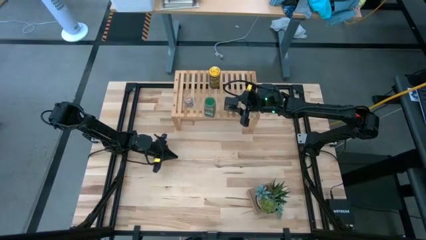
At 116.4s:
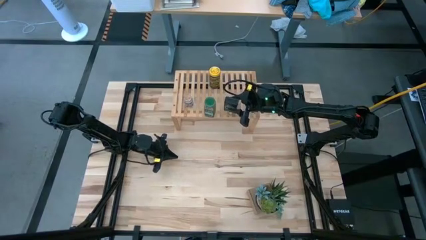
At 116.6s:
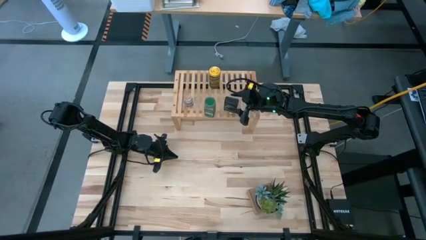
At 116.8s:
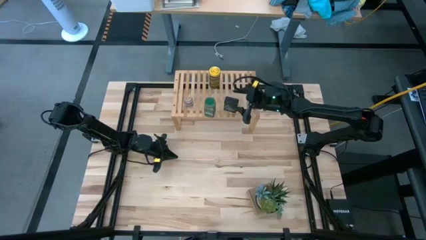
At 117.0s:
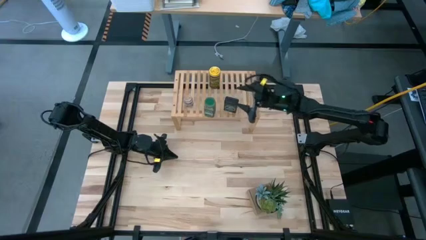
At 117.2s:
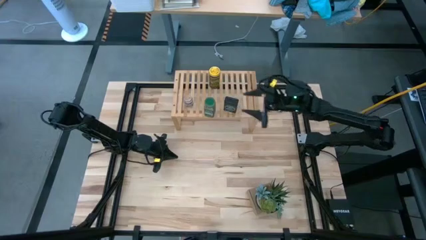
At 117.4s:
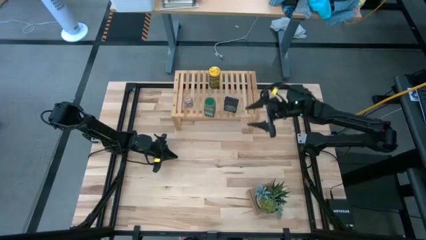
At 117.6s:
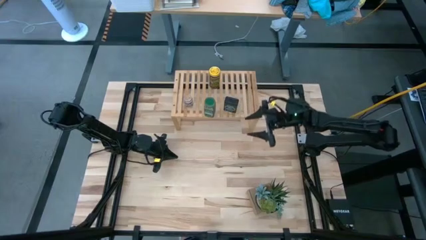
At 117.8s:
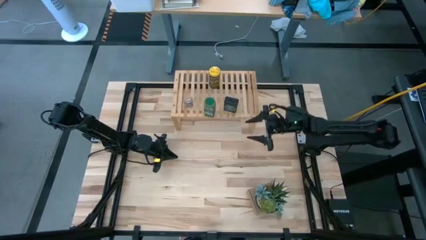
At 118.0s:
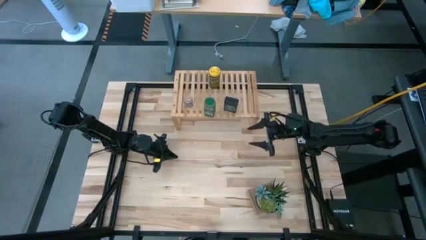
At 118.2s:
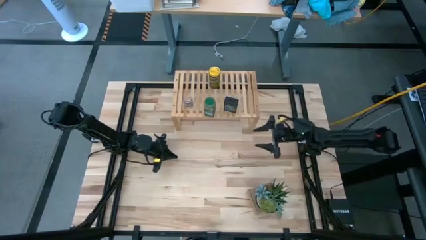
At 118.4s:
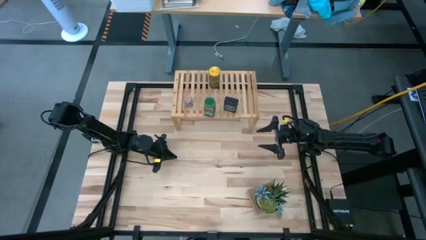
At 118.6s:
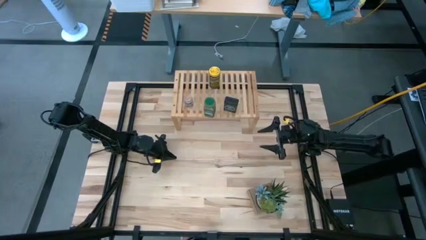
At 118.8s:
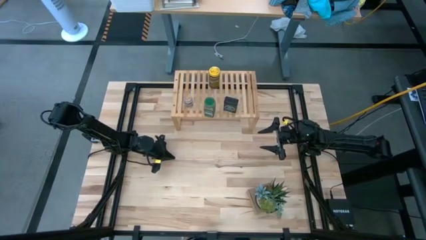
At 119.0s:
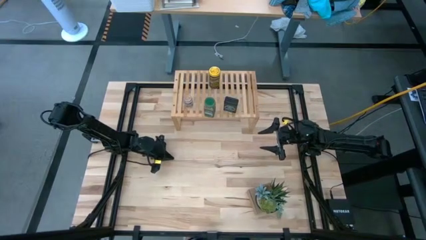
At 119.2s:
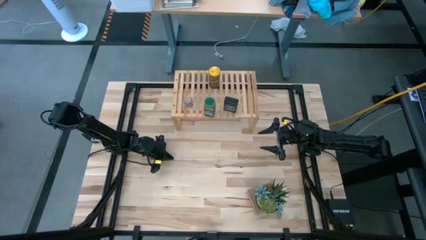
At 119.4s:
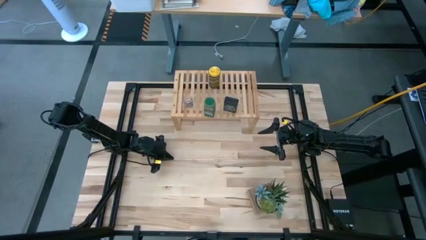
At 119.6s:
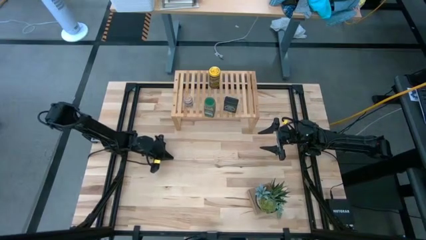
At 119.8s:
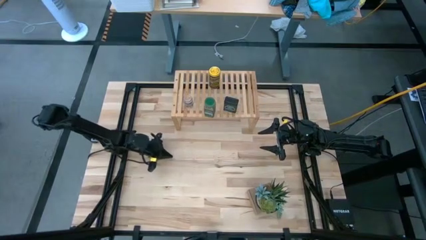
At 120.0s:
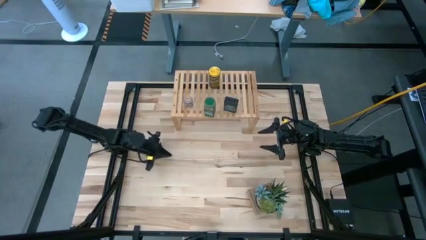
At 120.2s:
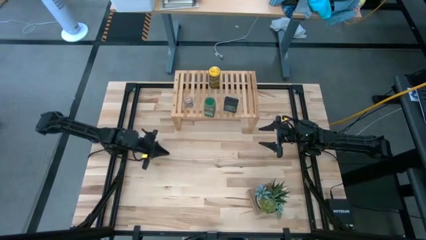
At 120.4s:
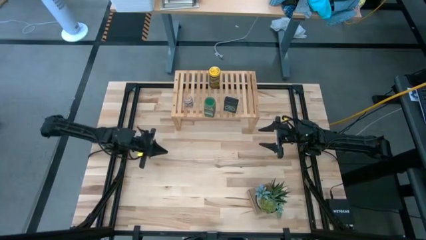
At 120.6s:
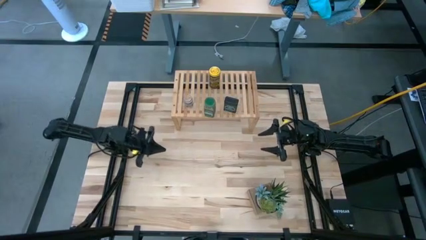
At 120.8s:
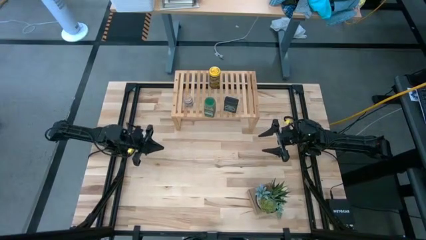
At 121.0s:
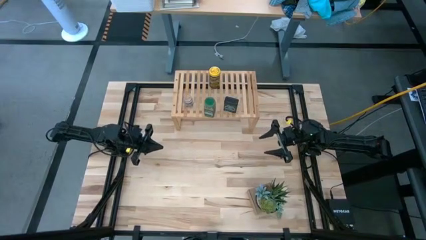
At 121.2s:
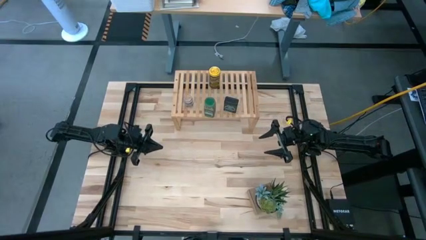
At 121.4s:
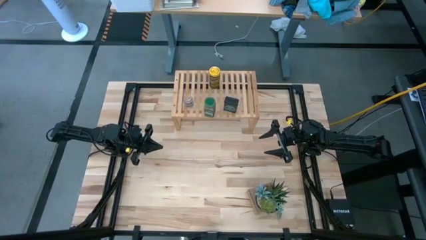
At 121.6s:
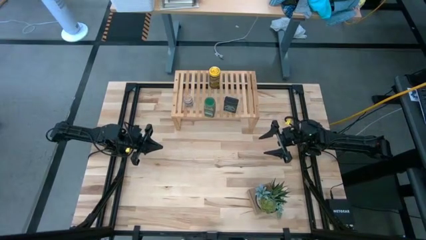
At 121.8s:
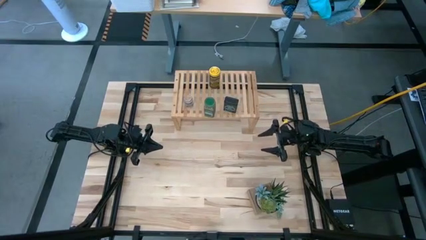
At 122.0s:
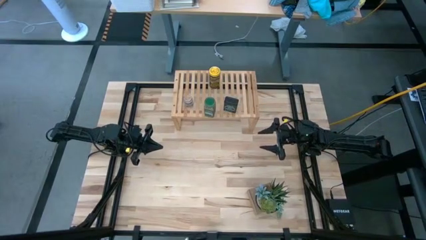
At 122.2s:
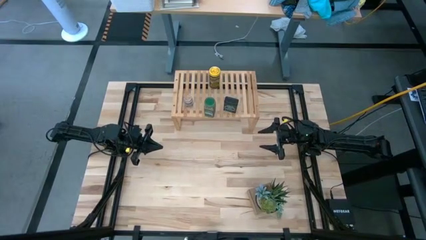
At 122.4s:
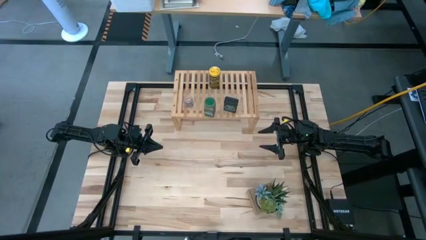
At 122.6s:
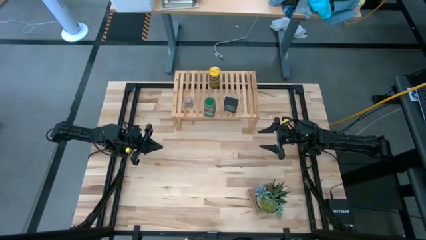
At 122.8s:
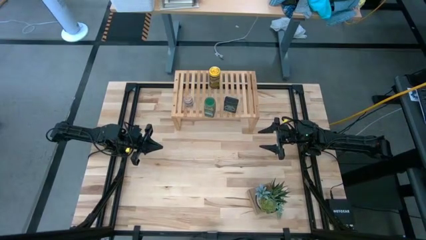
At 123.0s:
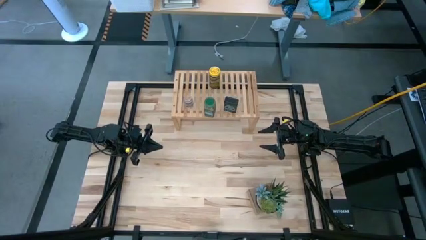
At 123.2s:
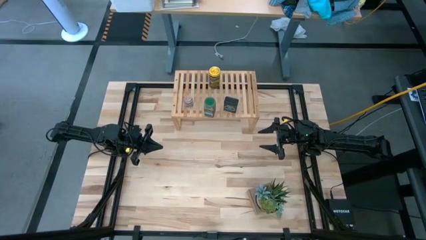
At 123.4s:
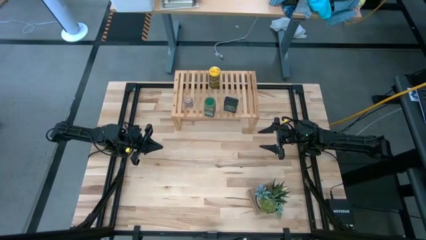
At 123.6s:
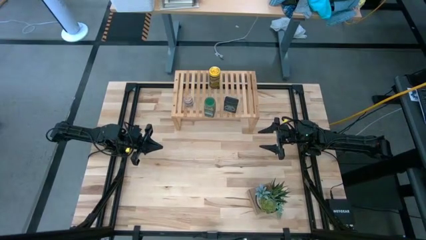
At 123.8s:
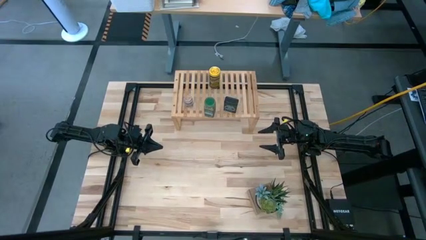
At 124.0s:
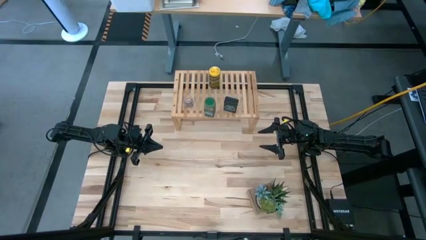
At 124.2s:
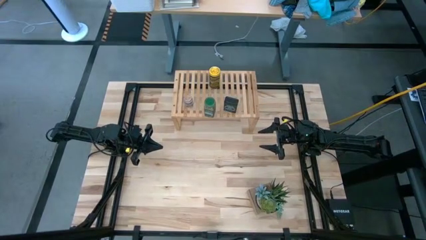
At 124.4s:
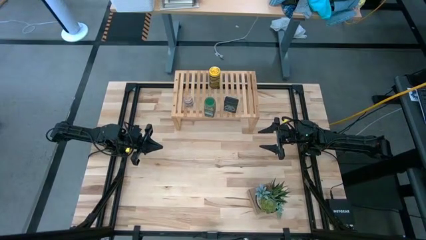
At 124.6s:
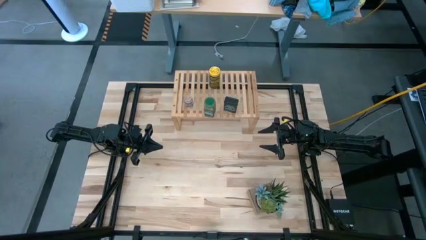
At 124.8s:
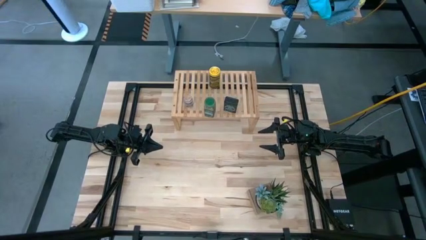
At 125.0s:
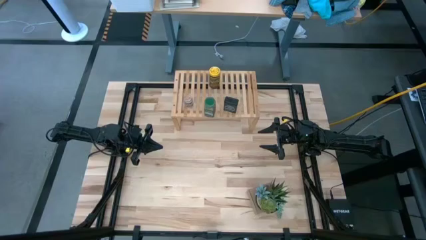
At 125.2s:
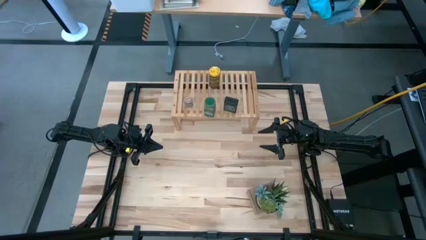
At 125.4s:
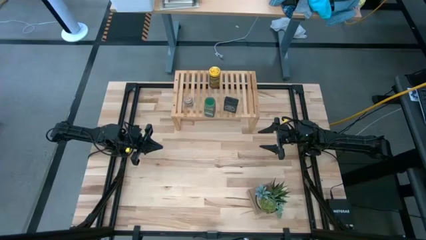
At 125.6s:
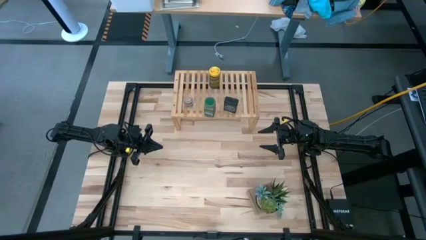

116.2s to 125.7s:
Task: Shelf spices
Return to Home Position

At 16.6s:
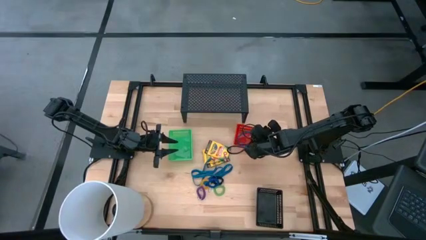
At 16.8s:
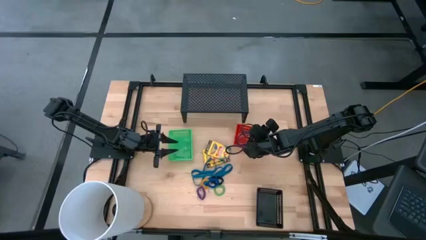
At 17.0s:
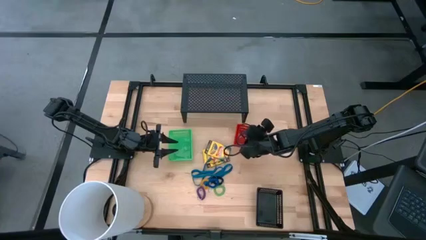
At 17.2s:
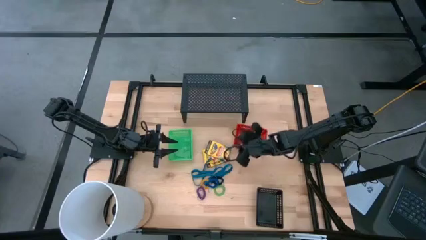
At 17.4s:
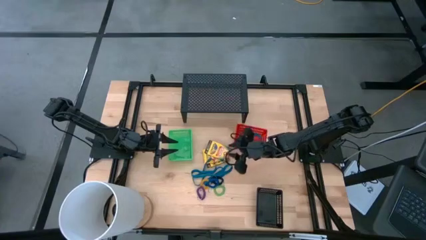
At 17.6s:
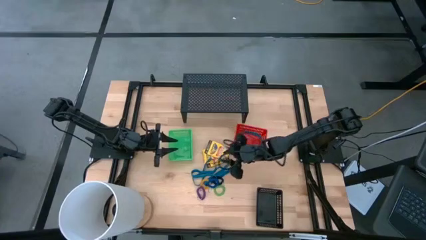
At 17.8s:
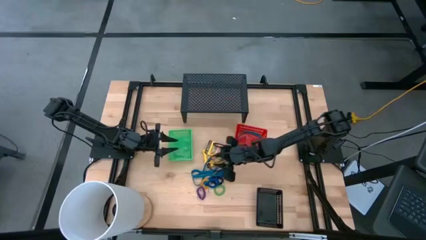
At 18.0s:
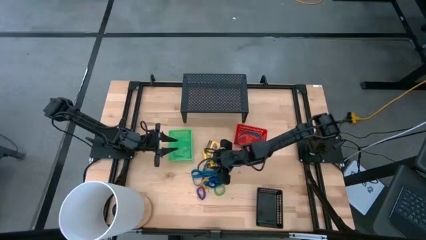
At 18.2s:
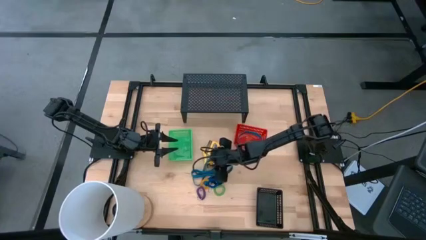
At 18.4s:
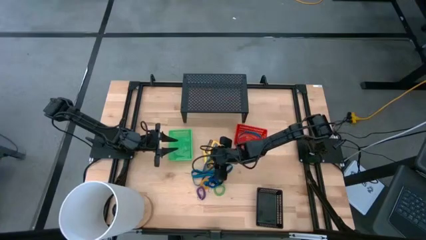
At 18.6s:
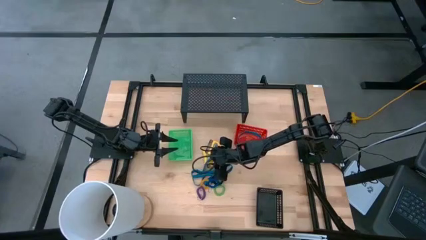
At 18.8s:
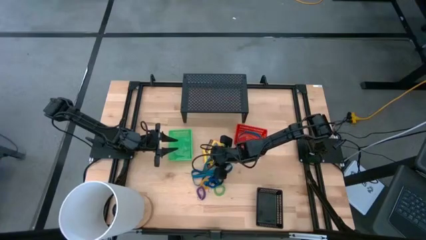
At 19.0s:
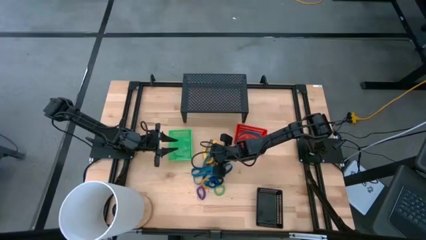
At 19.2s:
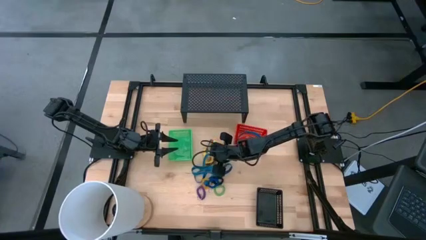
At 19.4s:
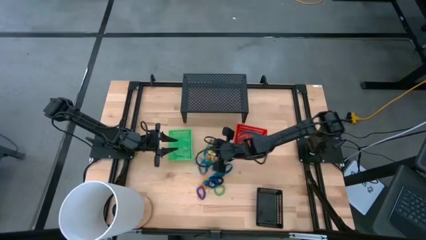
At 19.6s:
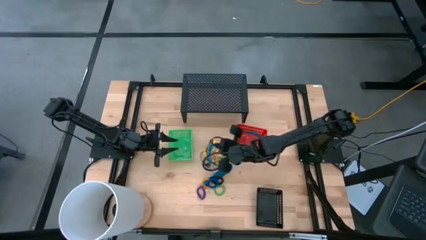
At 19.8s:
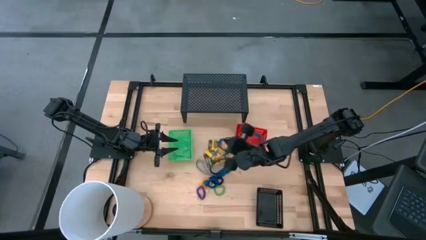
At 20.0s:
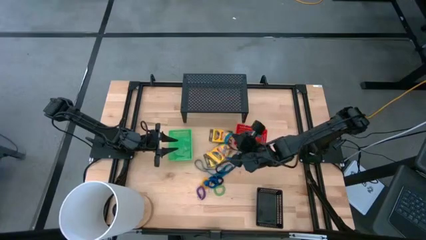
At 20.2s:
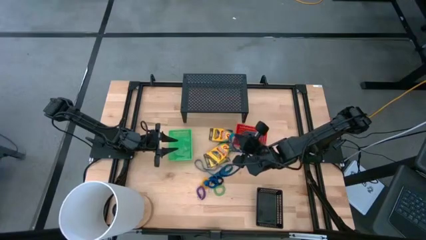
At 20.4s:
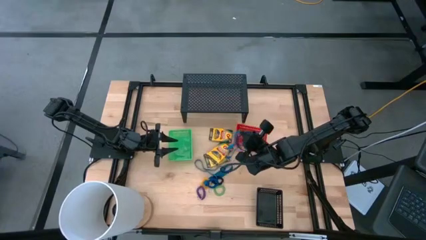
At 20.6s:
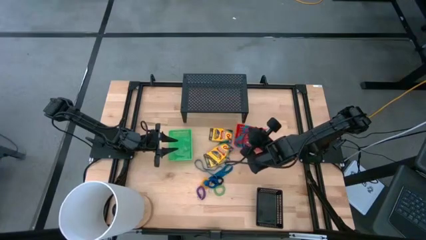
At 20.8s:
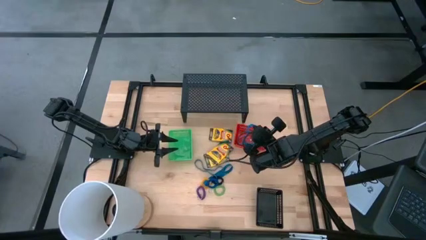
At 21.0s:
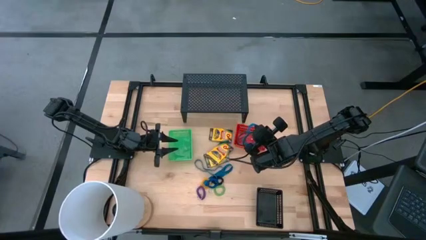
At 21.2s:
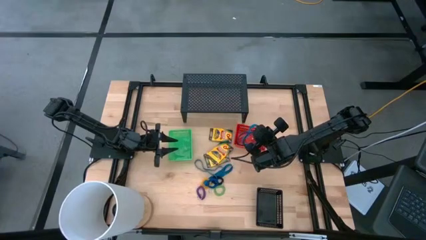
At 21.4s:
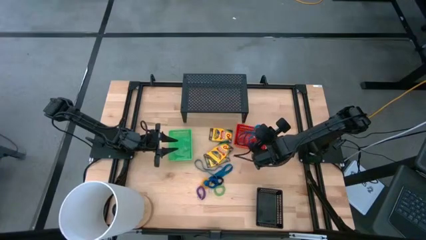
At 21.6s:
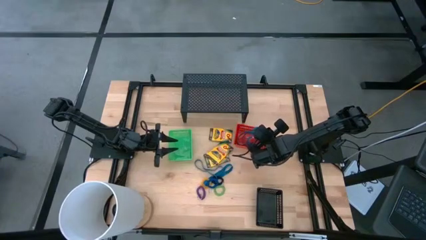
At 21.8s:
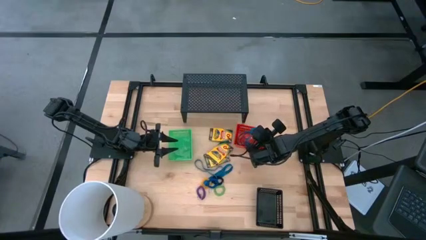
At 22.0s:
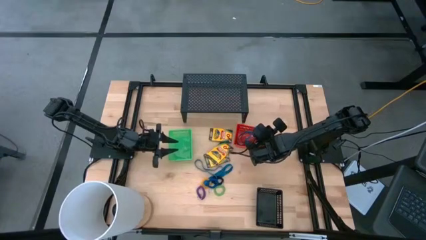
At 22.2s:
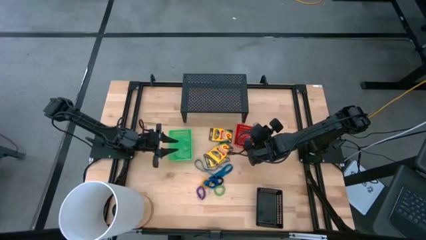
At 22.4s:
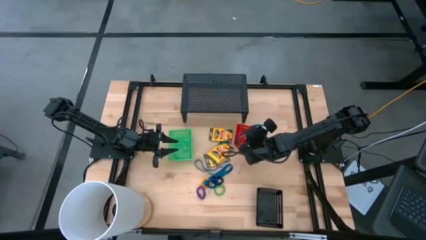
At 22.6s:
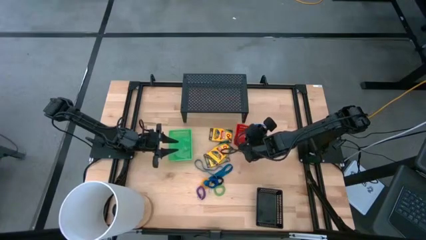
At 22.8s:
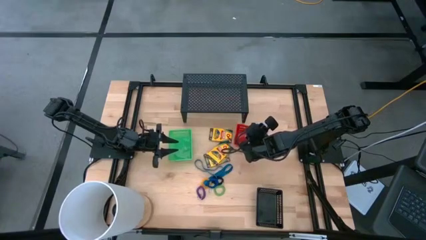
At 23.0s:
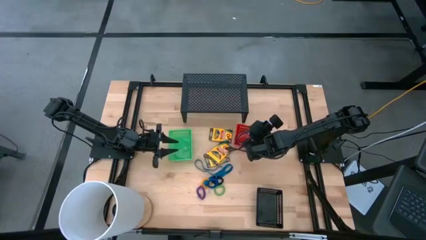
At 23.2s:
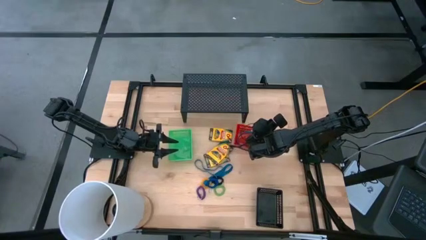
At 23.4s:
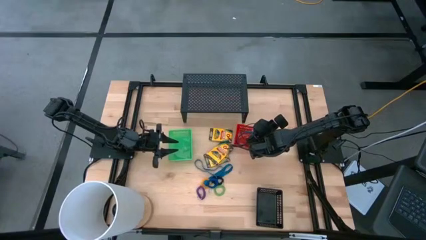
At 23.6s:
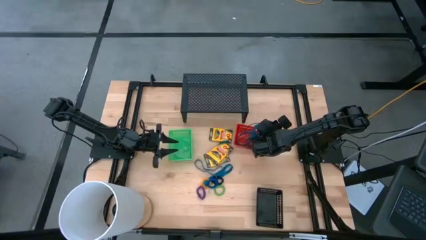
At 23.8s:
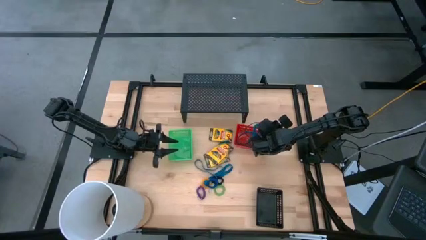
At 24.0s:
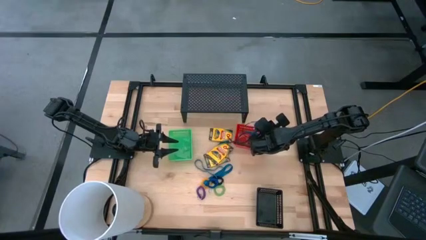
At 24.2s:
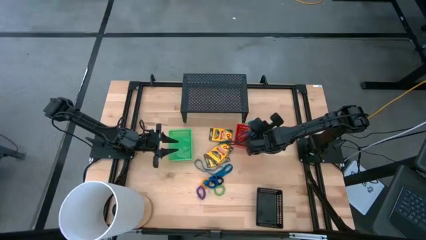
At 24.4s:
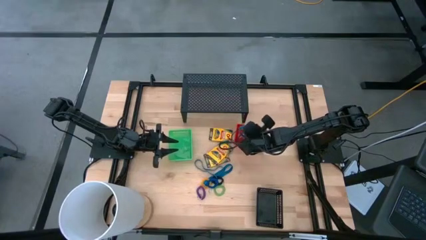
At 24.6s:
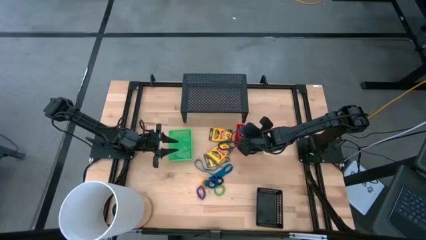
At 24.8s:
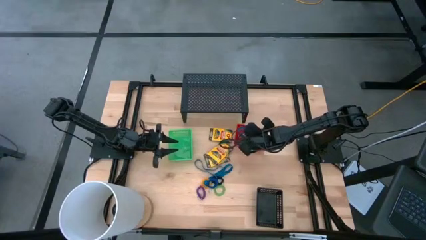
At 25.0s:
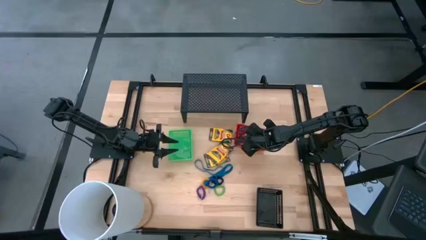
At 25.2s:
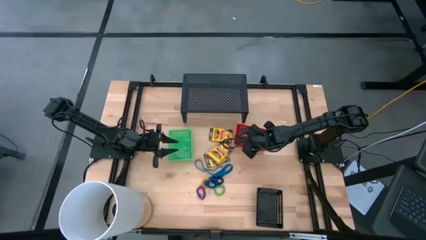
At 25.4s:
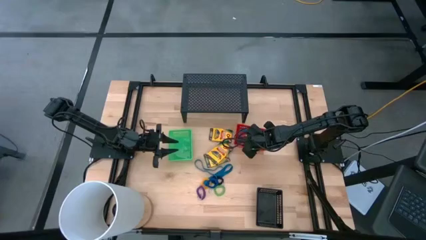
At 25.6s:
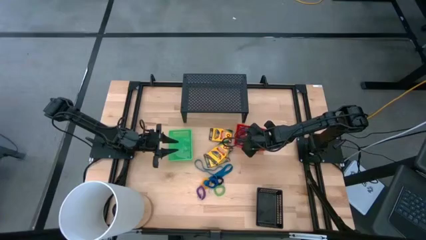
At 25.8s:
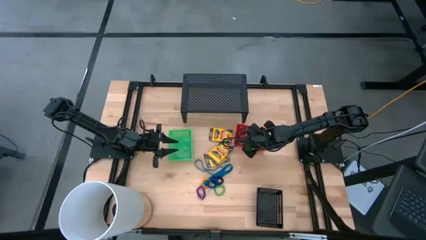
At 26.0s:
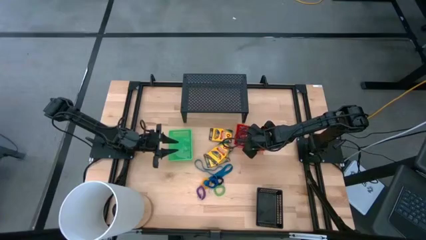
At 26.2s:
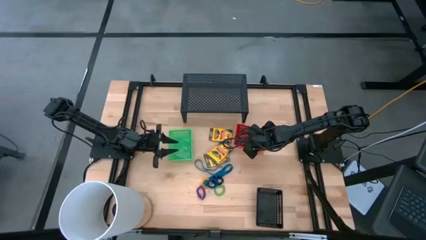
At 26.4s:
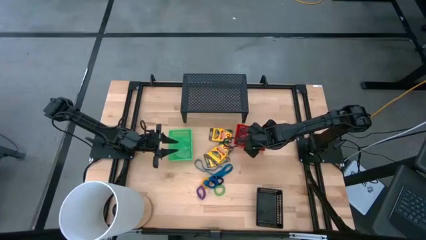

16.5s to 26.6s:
Task: Pick & Place Office Desk Supplies
Put the blue rubber band into the red bin
